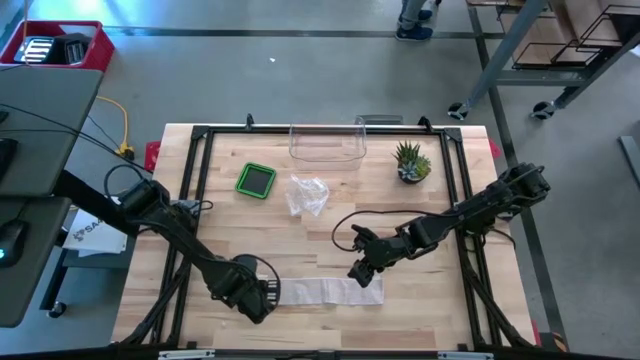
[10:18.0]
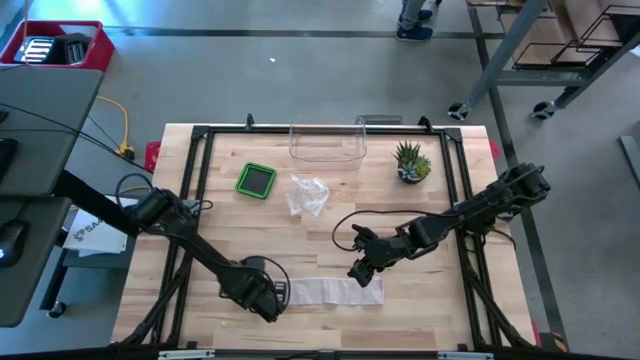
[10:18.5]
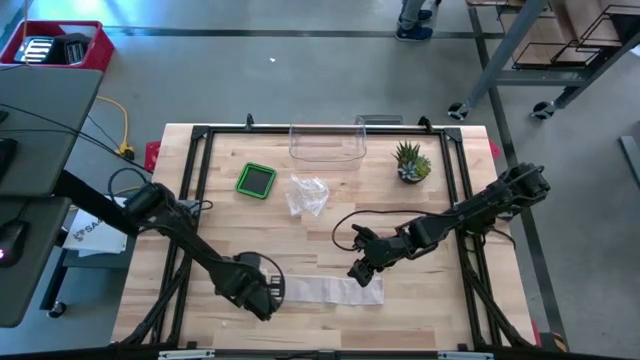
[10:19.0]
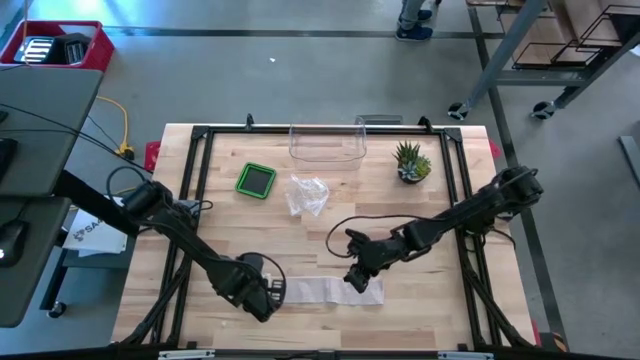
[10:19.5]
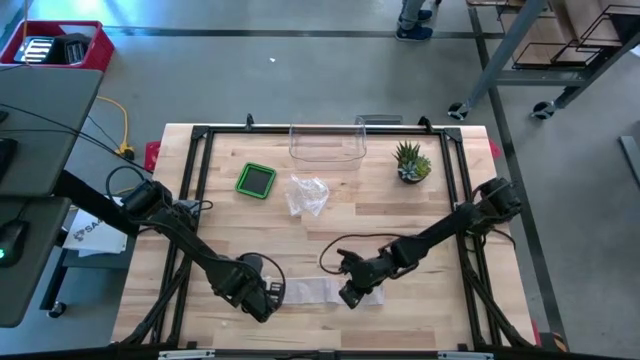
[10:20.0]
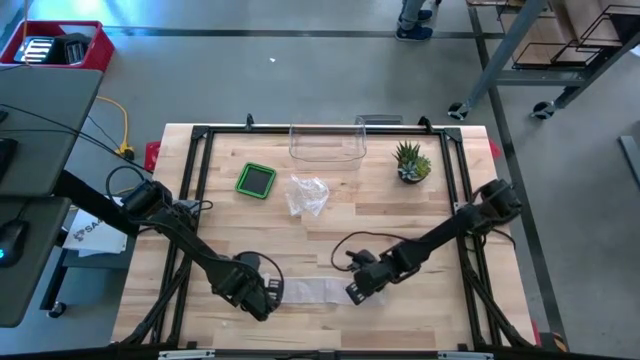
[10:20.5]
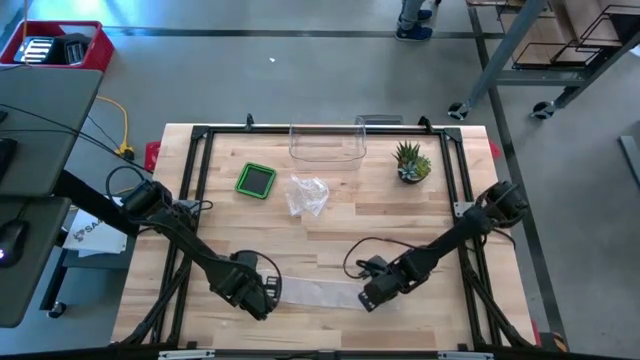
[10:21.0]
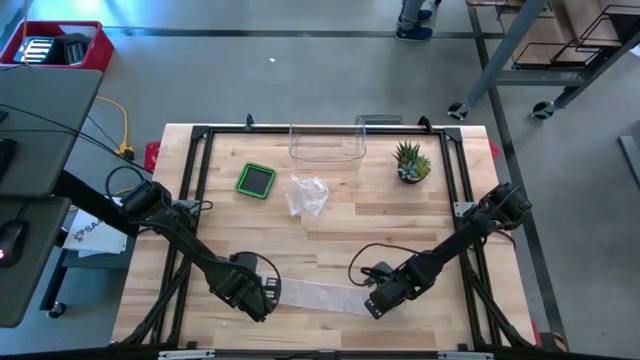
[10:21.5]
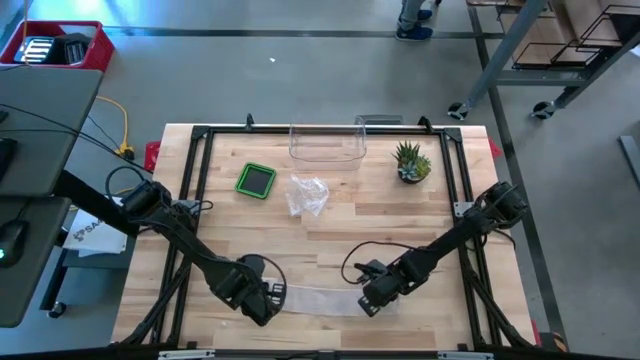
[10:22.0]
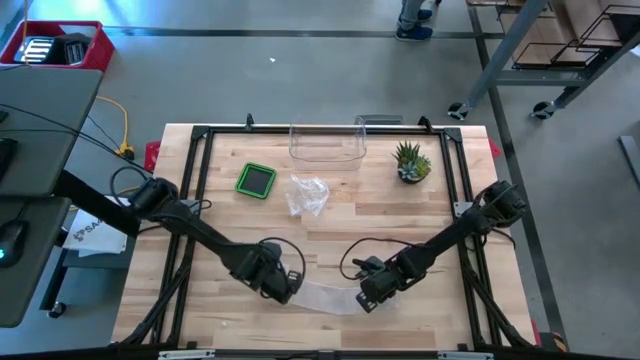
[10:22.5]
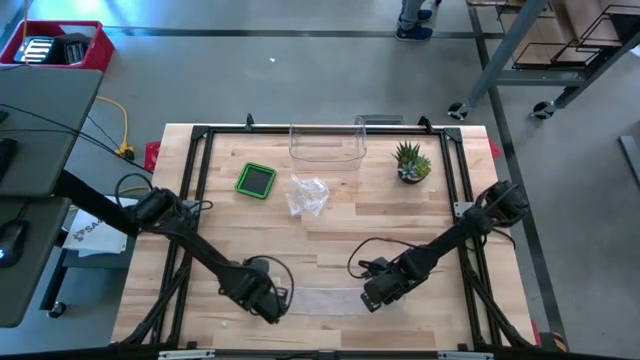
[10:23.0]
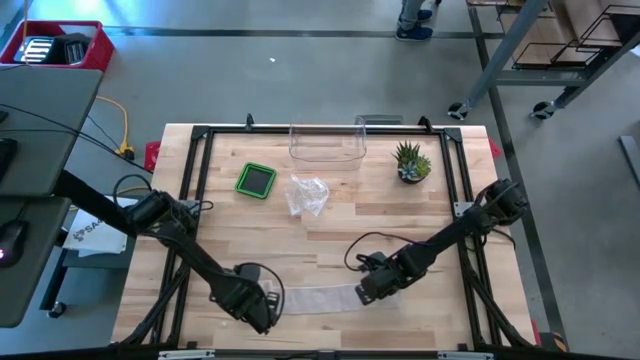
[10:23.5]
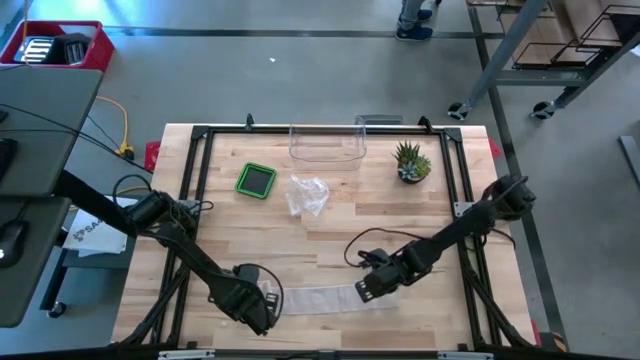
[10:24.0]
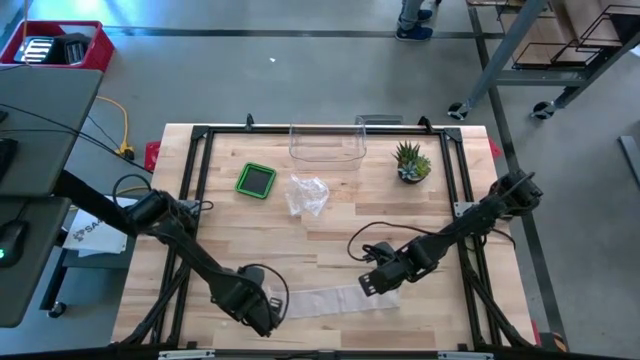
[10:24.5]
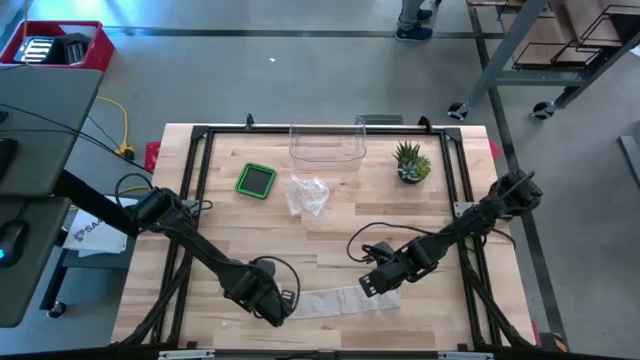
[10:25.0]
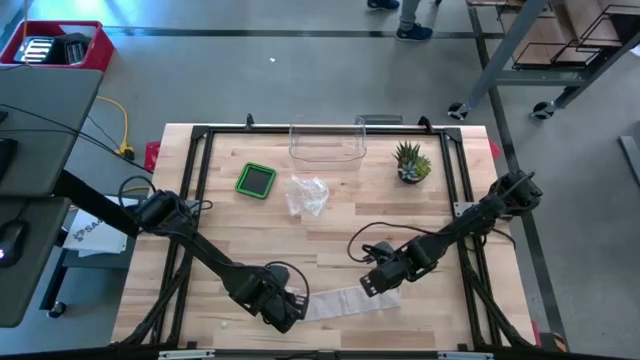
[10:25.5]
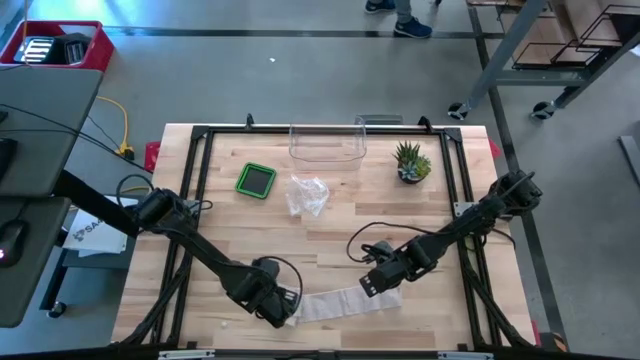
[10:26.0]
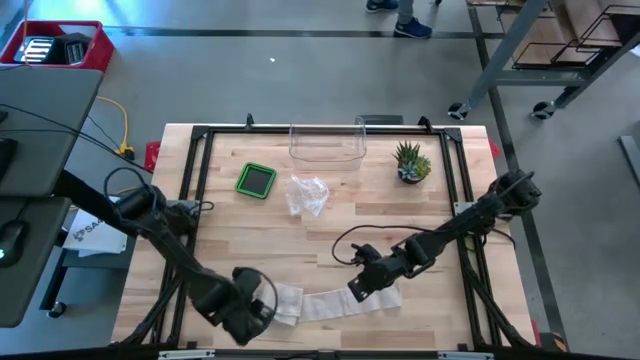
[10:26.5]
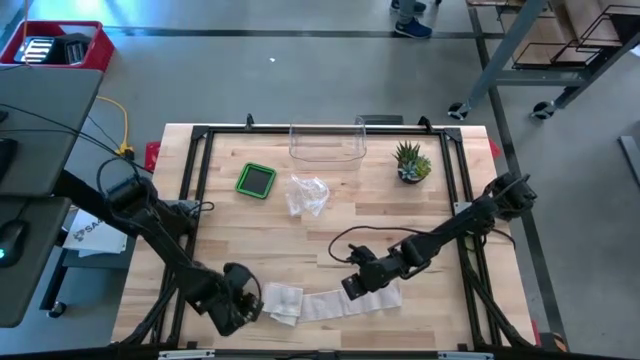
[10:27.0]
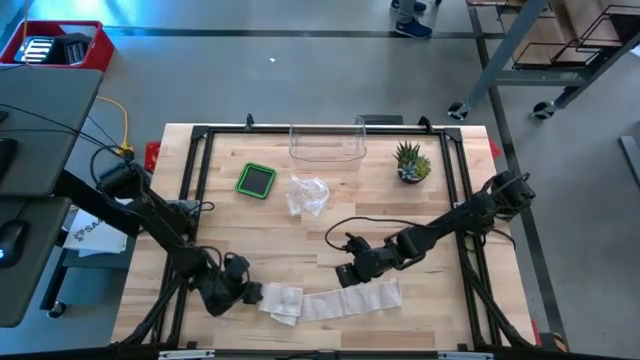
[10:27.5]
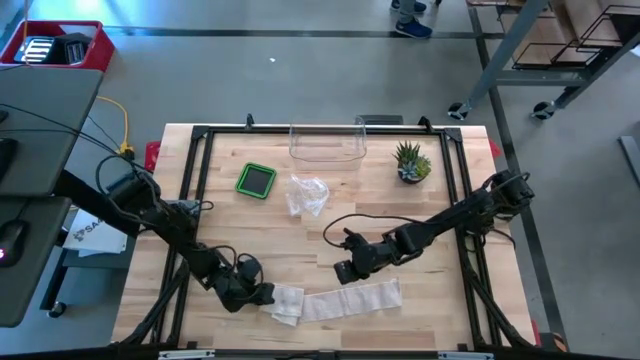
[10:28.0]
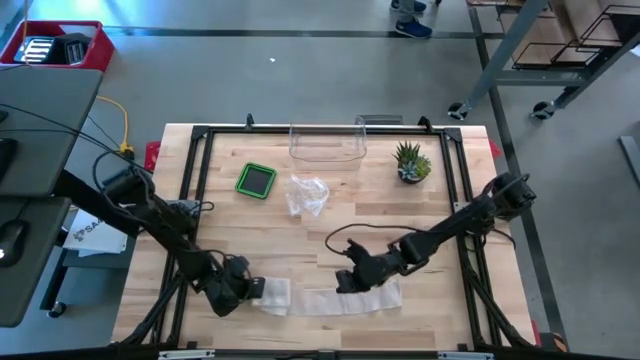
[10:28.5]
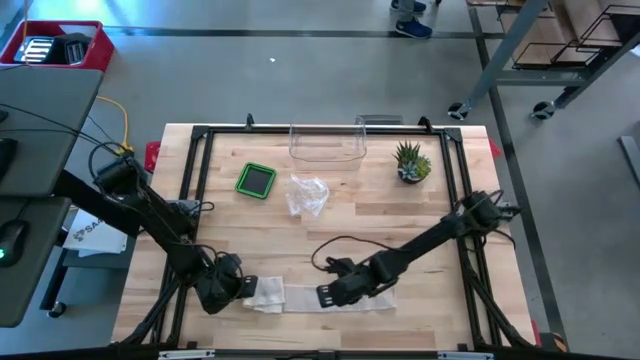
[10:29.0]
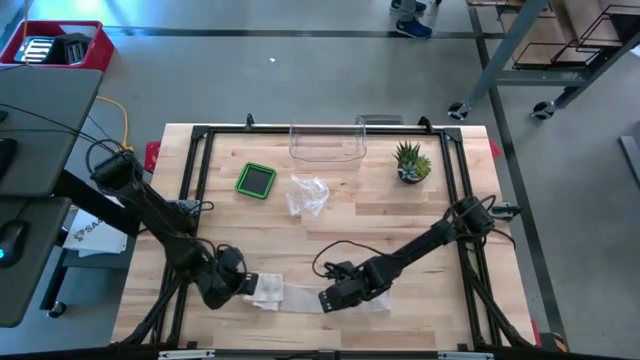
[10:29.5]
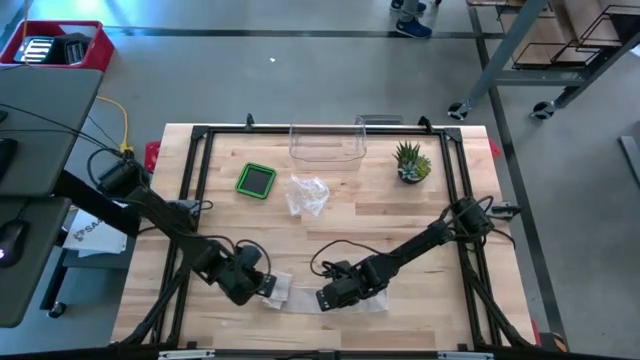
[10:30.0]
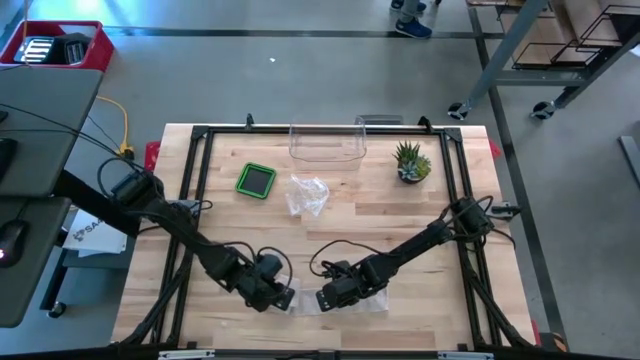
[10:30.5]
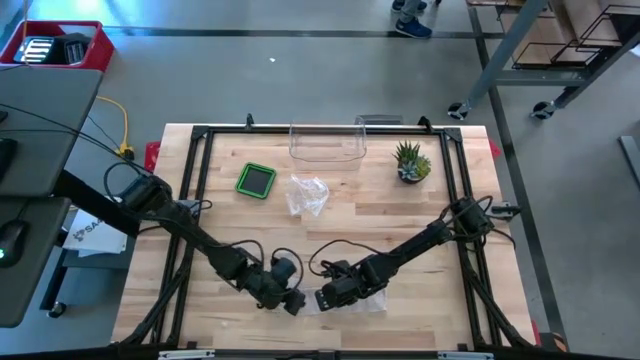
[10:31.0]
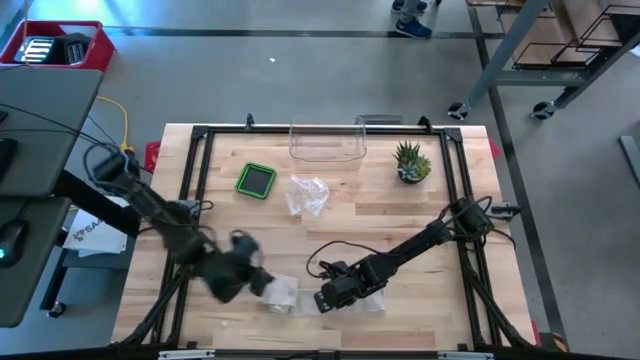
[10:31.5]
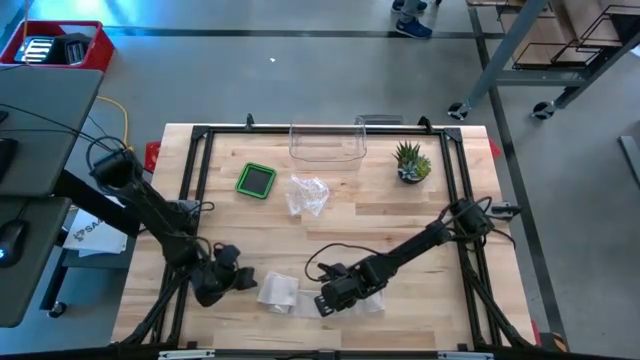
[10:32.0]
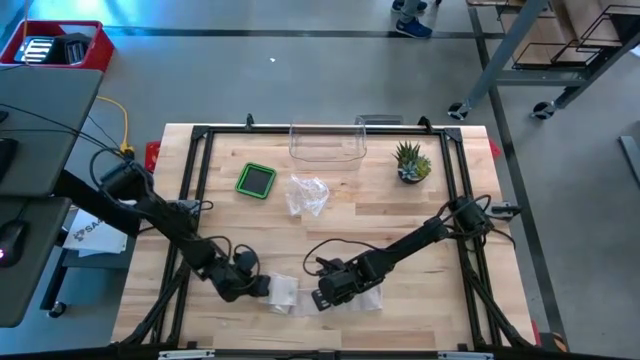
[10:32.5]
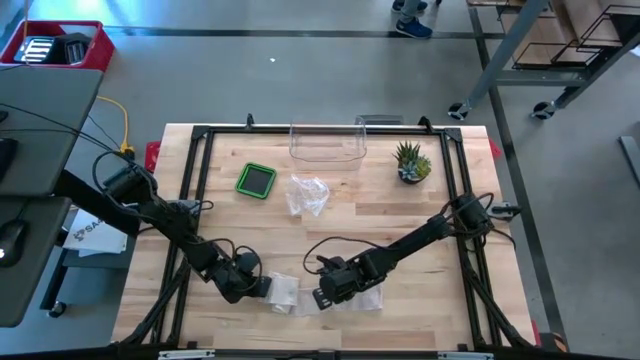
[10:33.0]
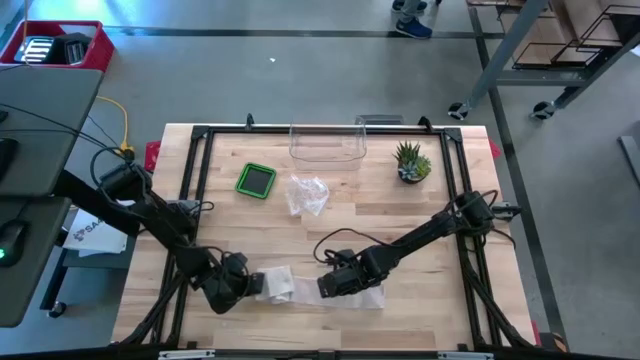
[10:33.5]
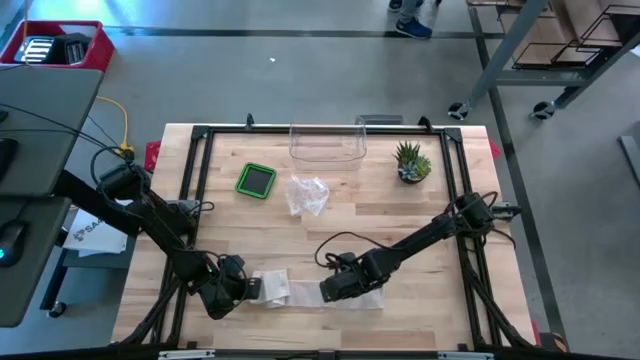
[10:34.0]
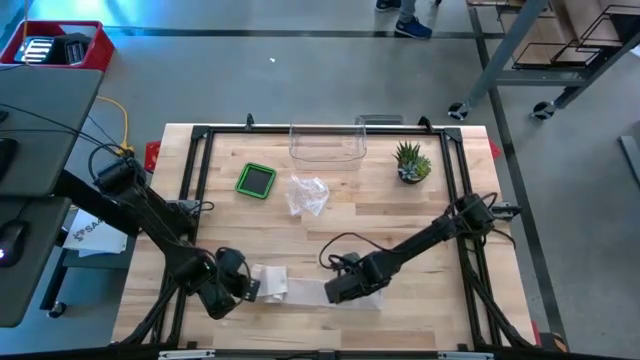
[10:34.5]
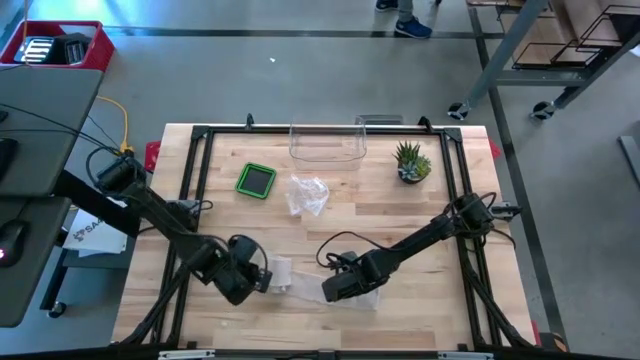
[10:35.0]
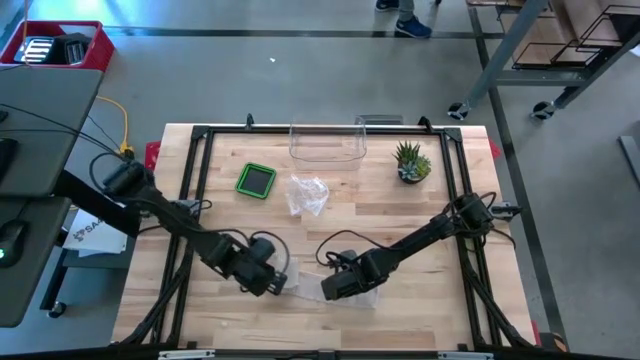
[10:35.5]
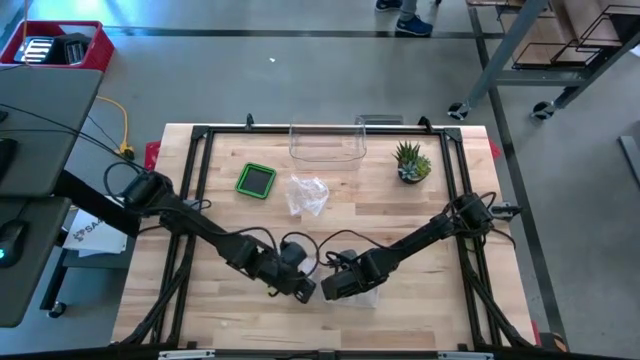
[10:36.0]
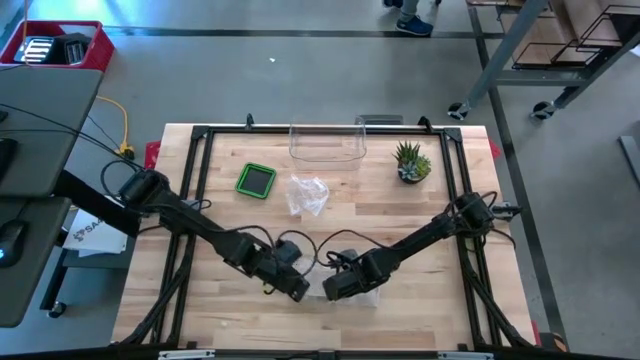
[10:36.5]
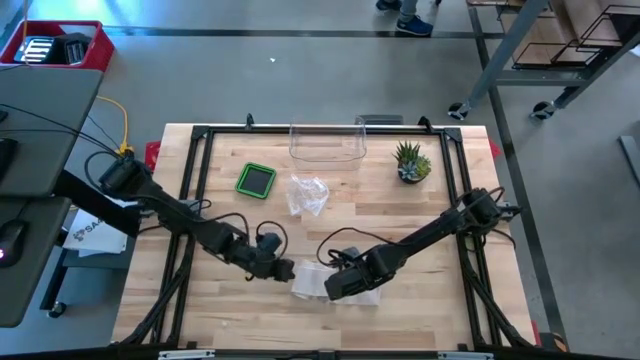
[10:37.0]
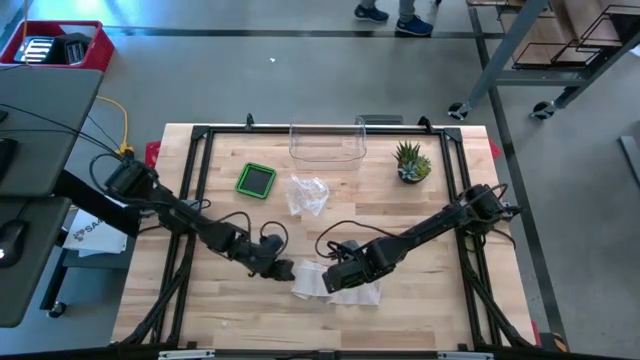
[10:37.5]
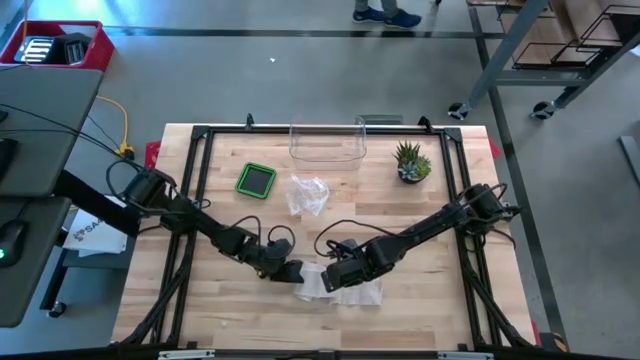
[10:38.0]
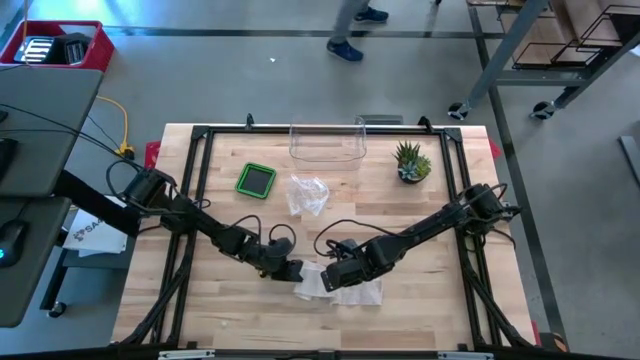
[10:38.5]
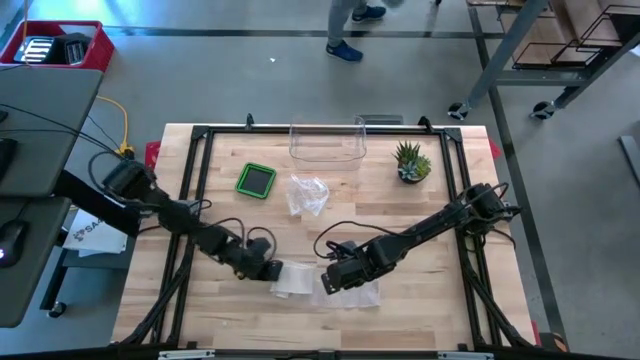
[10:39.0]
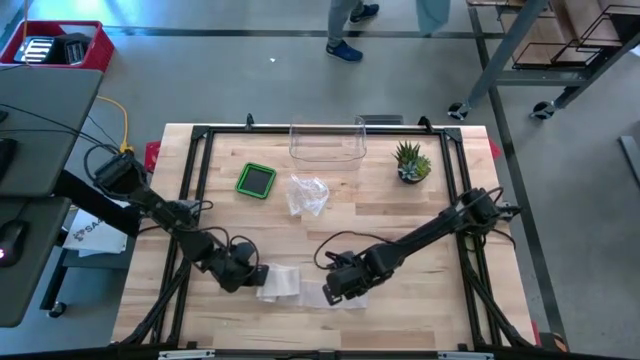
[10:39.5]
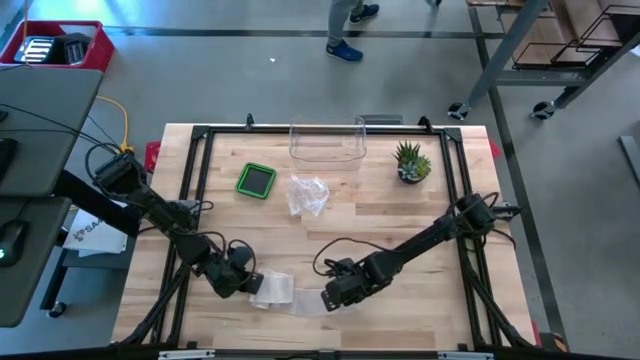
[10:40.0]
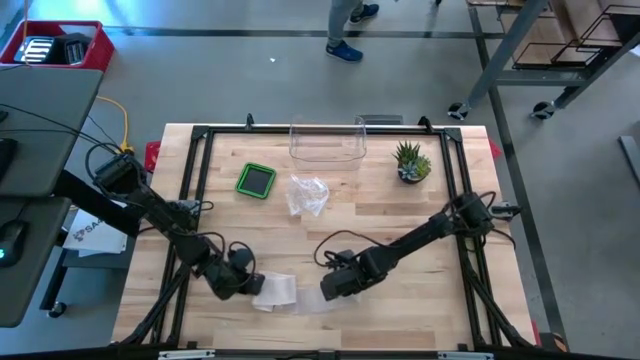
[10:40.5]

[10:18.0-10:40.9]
Task: Roll bandage
Roll the bandage
